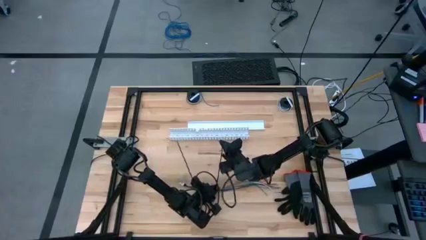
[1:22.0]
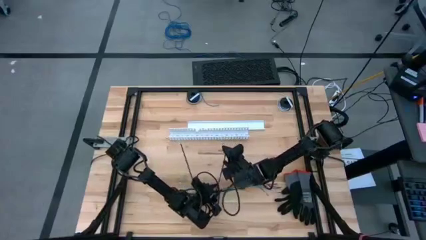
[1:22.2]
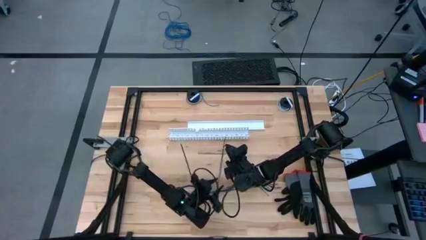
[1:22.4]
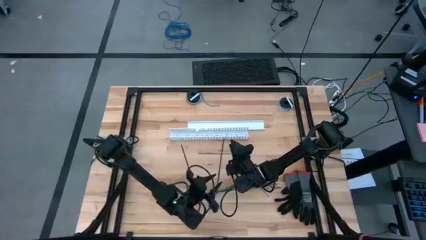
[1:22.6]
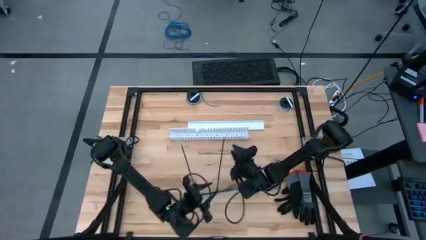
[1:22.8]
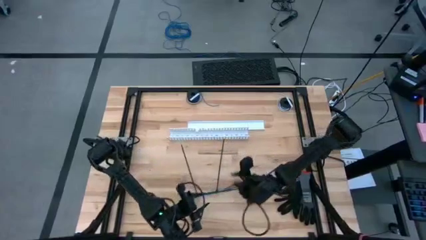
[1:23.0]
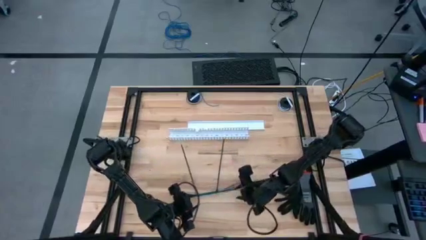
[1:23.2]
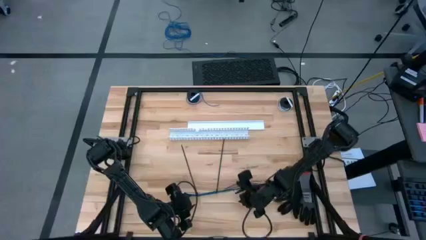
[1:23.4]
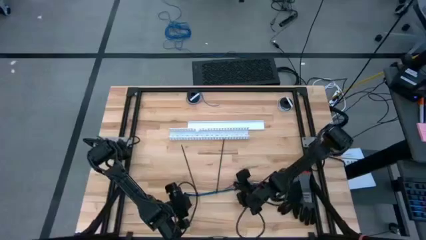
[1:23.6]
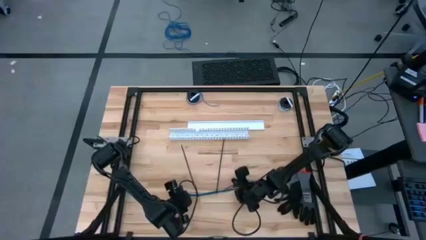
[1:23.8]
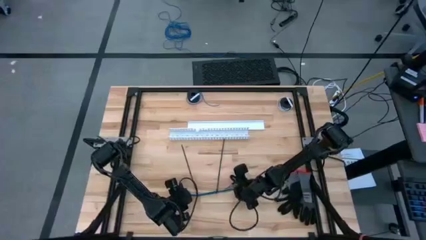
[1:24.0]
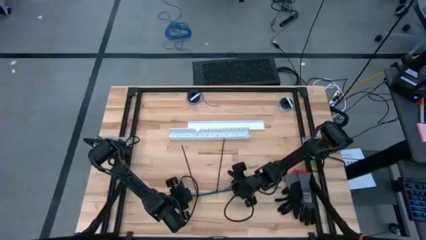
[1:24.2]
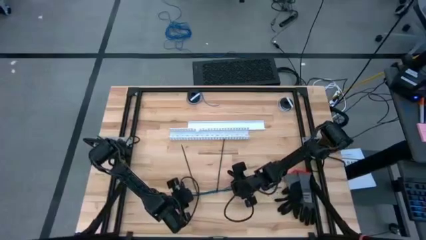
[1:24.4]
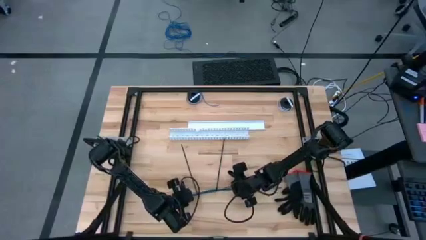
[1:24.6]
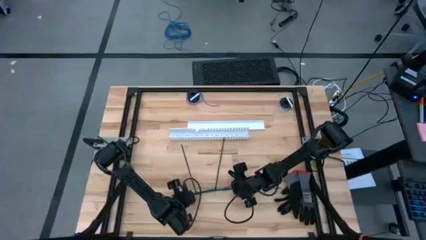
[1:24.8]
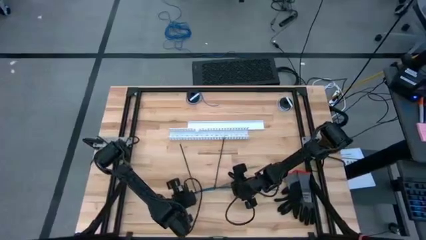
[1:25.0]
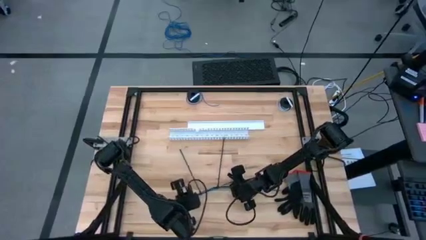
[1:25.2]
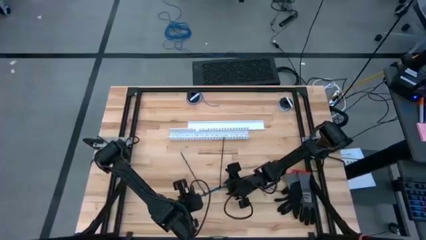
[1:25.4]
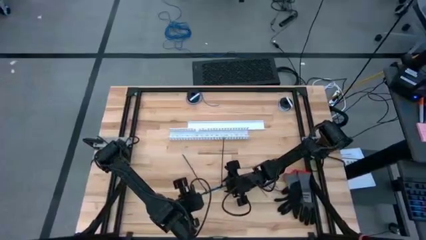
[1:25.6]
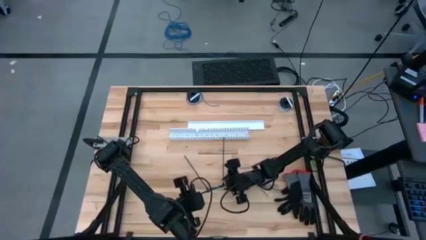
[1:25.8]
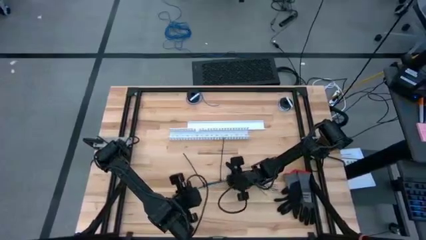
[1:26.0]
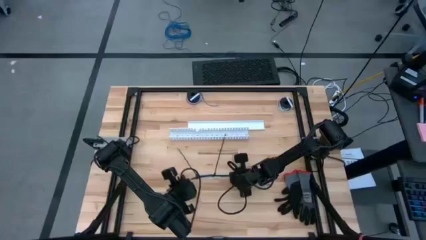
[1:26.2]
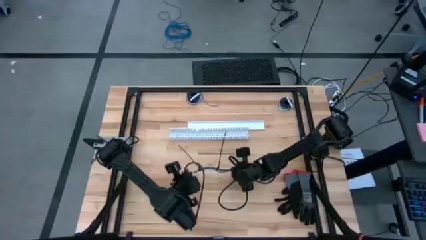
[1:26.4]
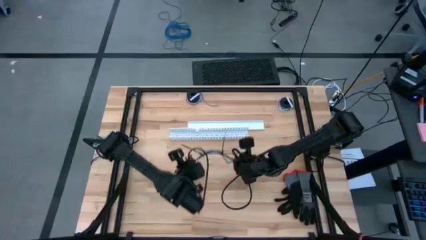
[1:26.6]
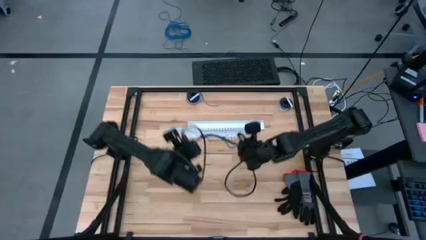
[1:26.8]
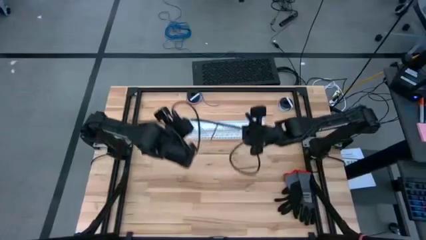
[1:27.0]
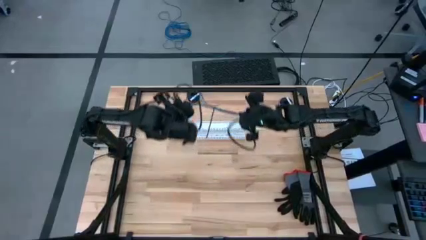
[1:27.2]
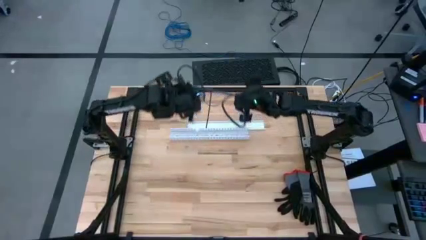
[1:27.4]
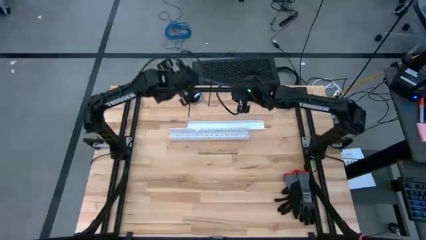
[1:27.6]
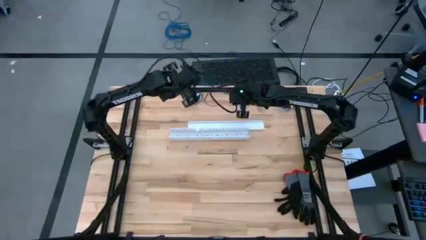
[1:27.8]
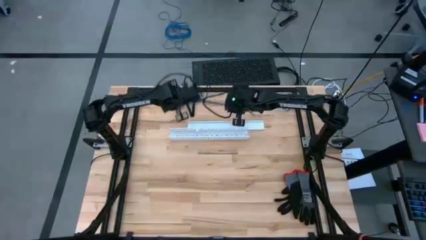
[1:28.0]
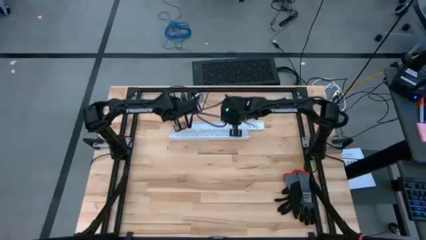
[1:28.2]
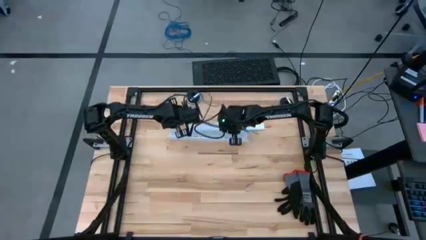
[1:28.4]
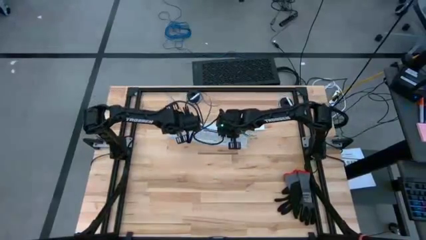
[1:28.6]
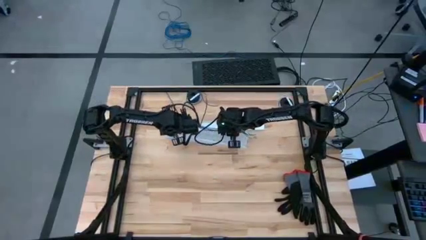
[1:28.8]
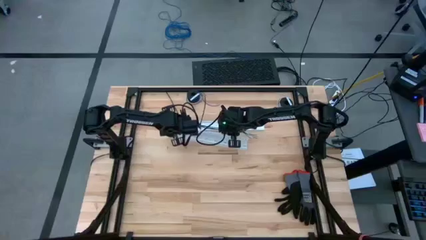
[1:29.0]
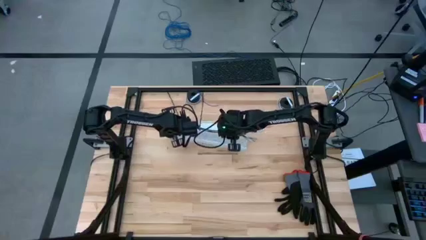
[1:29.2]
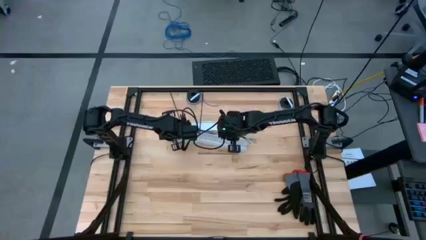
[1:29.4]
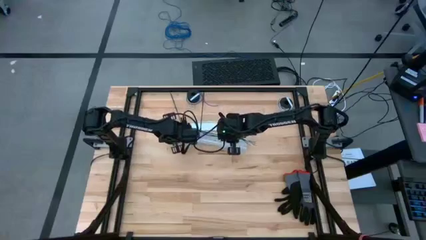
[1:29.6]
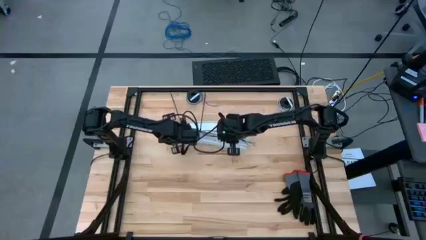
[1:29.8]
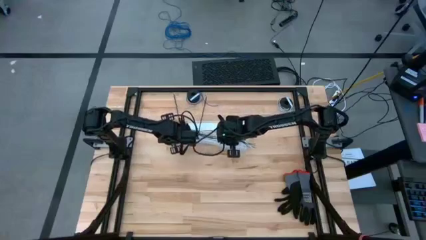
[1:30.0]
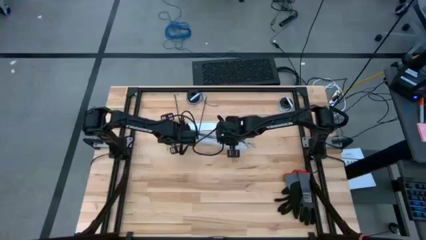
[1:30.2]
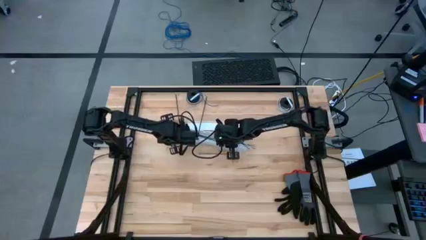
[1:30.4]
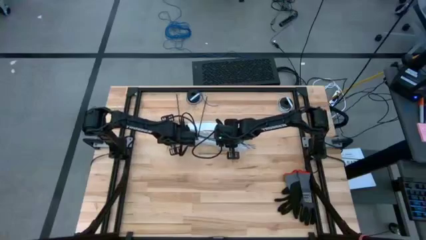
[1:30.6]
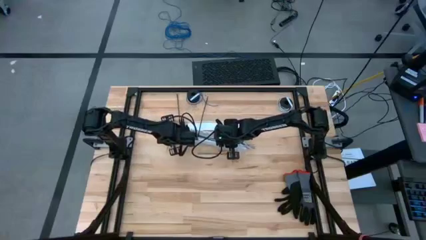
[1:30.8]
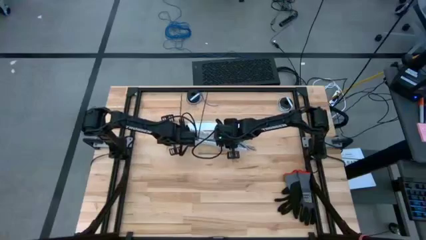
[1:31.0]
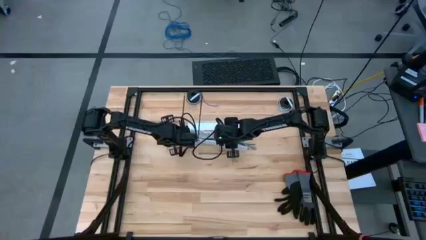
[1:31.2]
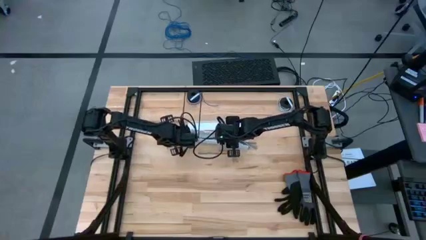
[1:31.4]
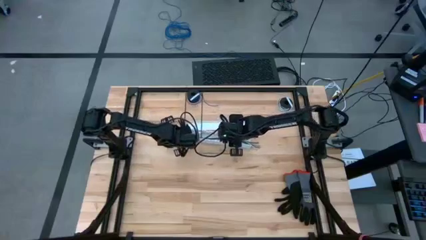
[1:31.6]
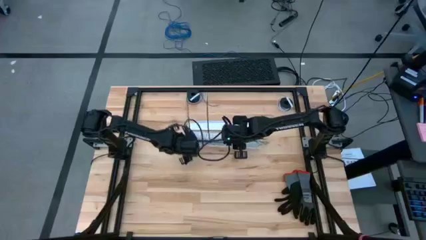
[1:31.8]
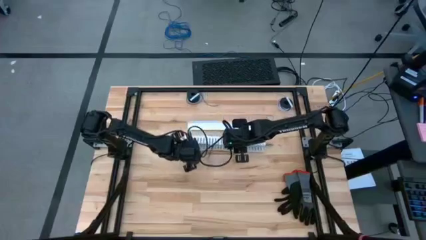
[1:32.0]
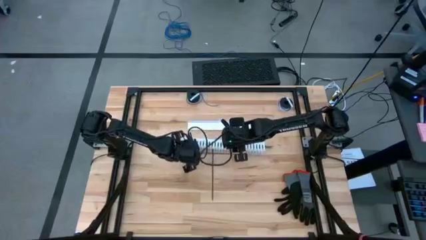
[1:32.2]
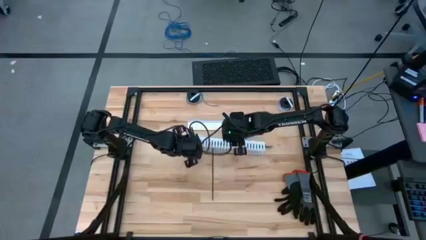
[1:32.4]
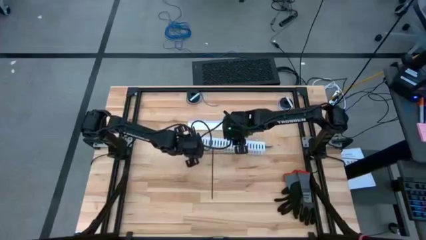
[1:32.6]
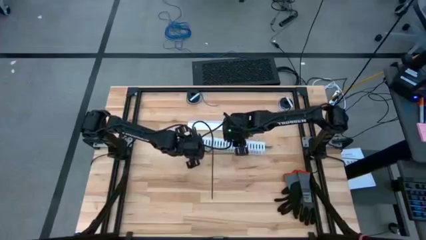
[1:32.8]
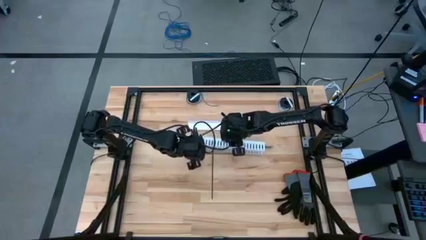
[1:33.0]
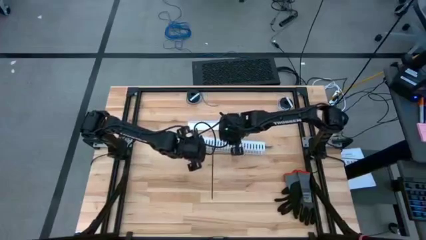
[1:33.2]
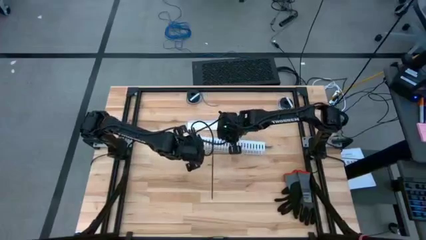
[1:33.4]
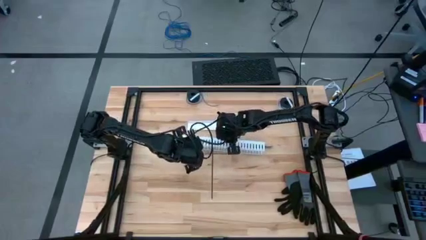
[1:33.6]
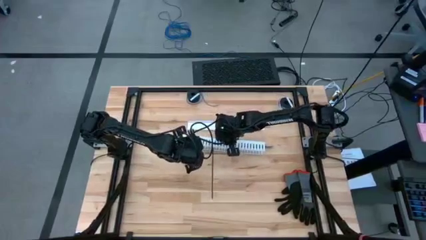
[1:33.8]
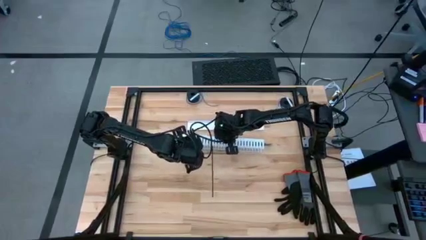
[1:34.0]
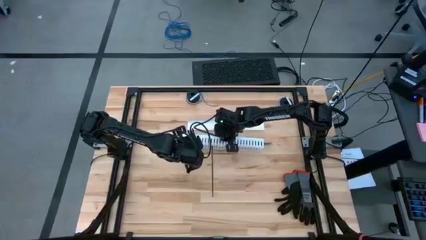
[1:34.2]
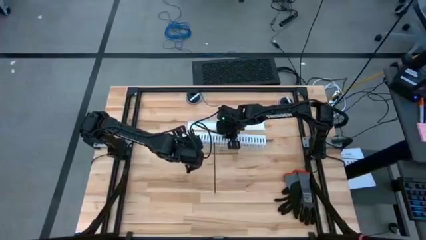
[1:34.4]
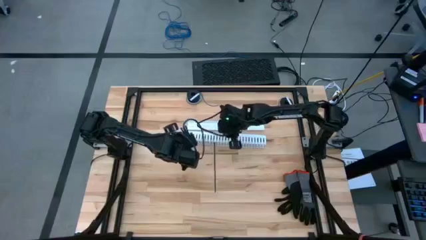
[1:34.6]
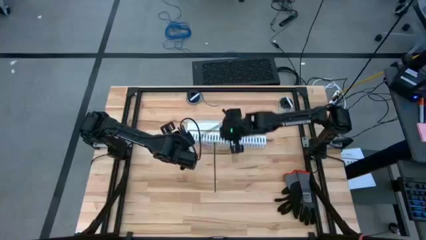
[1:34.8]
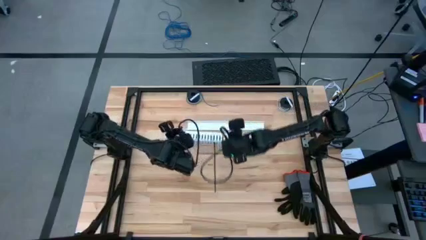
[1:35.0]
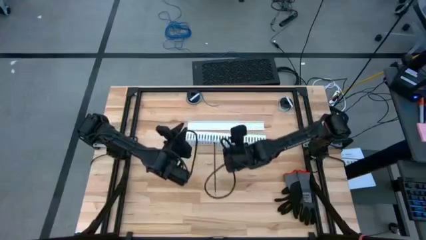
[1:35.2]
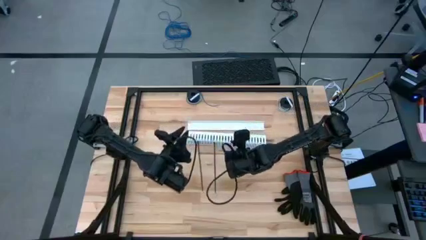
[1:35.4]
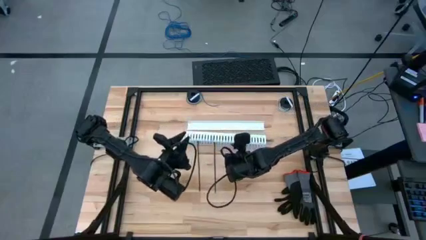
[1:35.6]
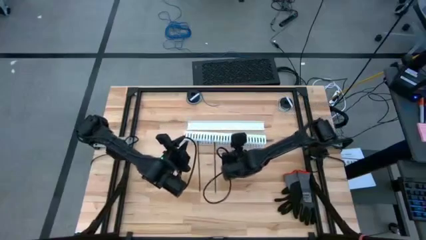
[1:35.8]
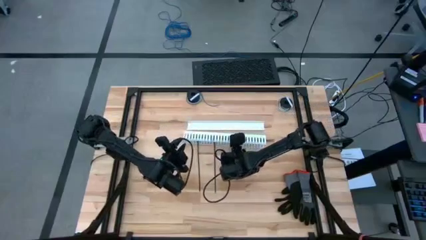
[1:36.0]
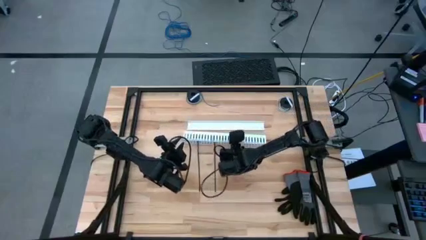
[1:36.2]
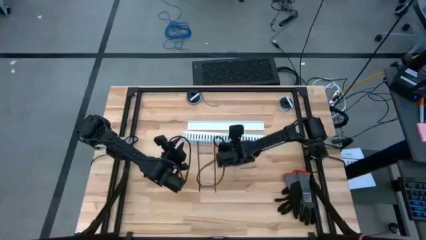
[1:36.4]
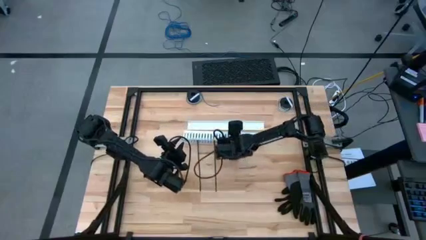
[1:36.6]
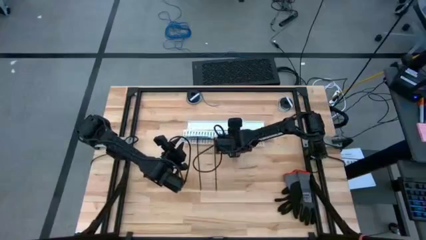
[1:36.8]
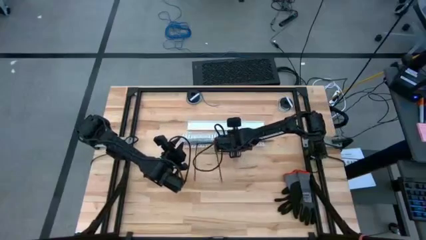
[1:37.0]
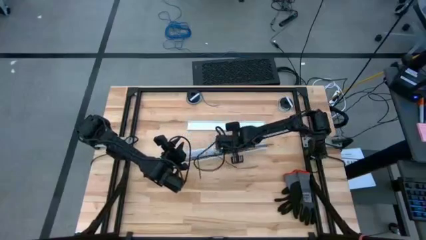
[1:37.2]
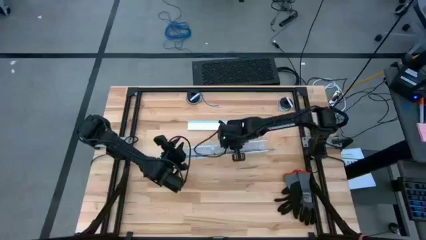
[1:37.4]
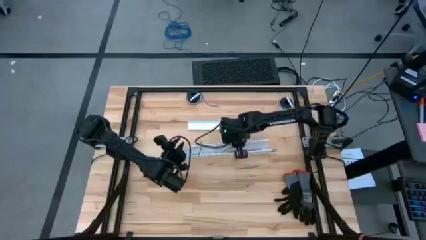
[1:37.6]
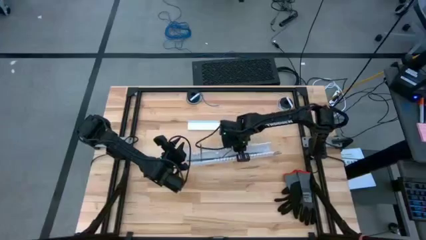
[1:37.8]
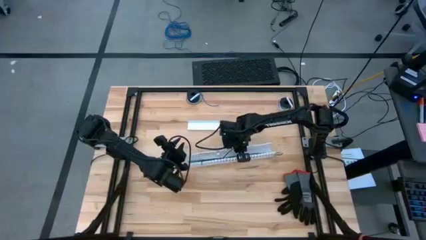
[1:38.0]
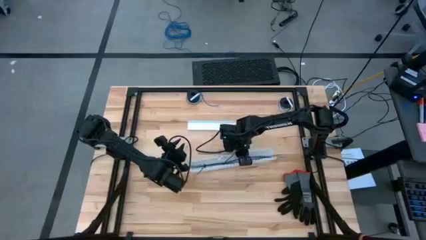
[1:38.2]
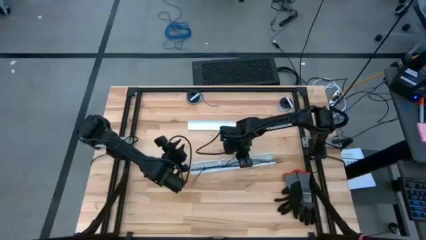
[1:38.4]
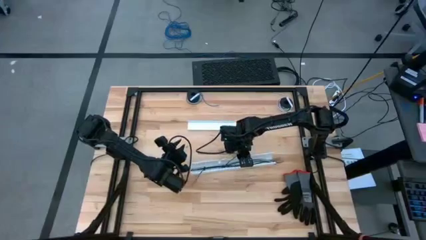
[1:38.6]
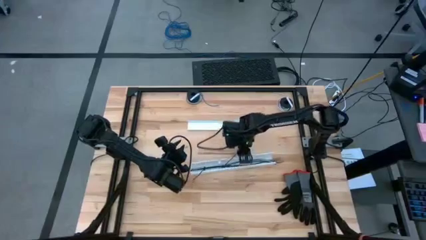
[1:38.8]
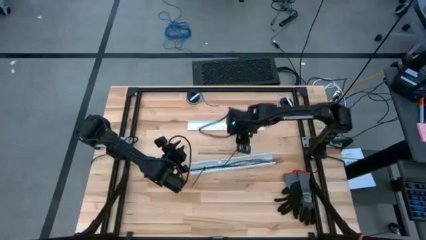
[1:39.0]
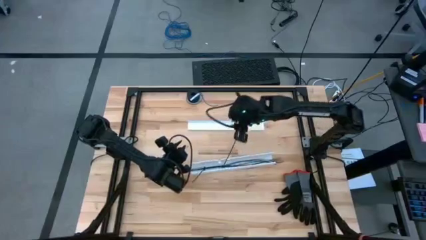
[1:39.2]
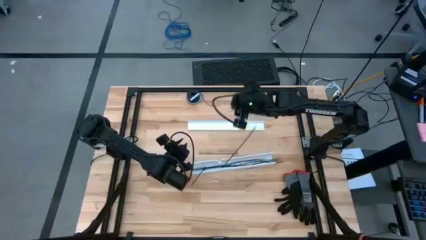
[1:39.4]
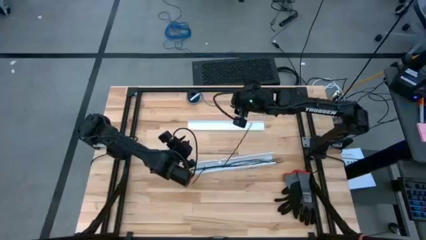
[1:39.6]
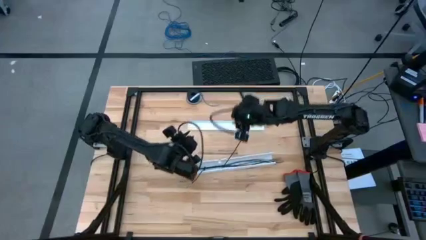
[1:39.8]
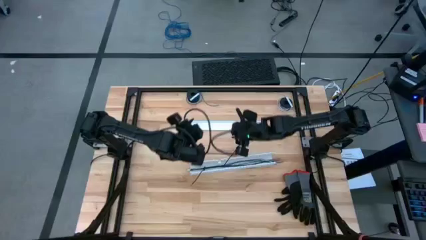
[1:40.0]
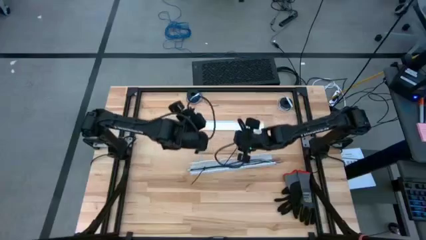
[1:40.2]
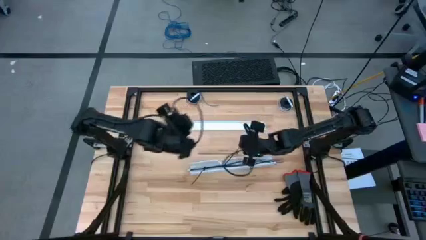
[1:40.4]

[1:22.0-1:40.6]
Task: Ziptie cables
Put the cable wires on the cable white duct tray
